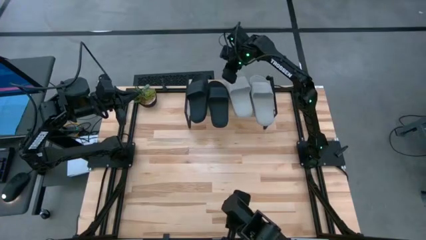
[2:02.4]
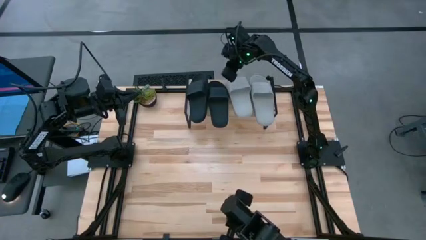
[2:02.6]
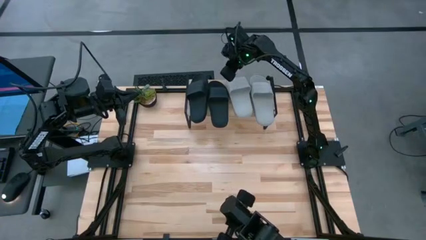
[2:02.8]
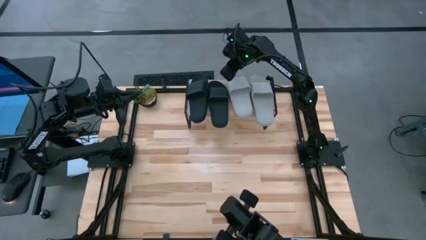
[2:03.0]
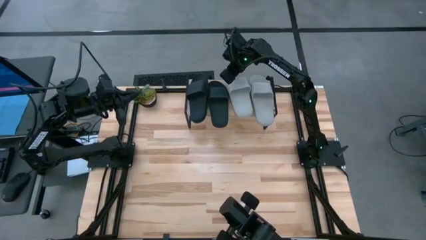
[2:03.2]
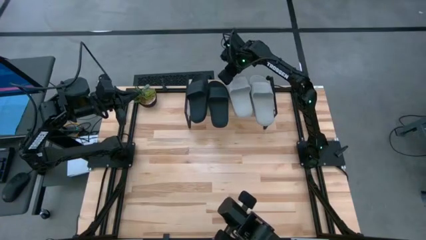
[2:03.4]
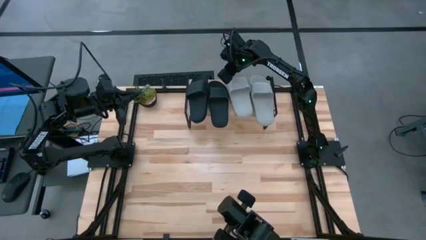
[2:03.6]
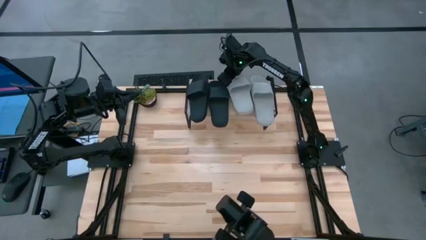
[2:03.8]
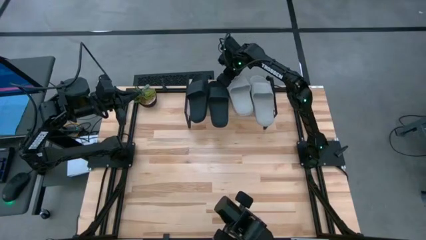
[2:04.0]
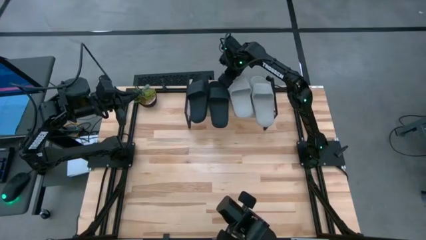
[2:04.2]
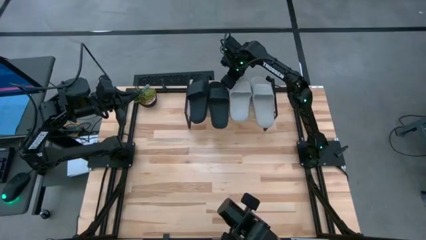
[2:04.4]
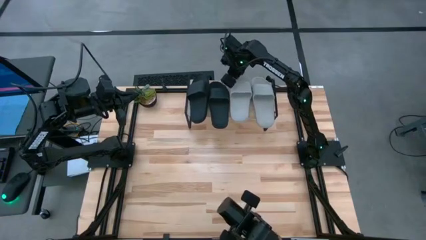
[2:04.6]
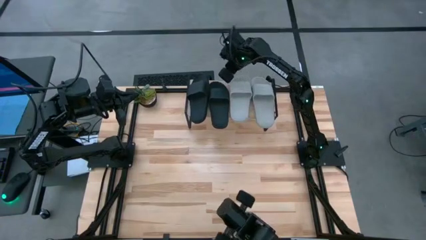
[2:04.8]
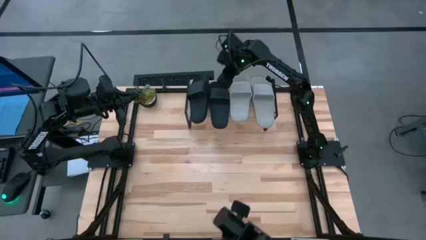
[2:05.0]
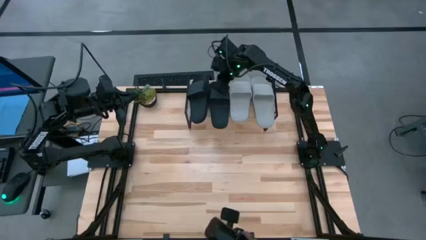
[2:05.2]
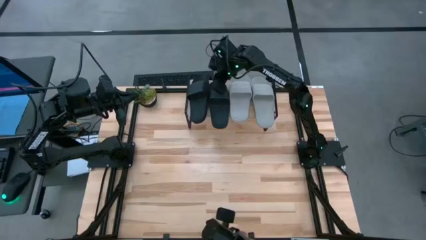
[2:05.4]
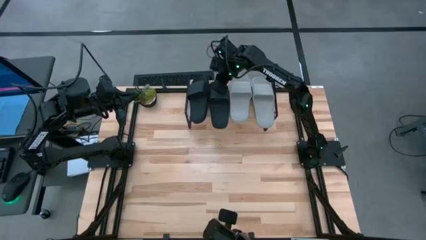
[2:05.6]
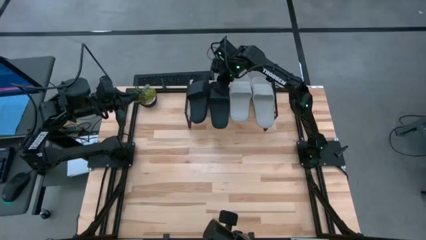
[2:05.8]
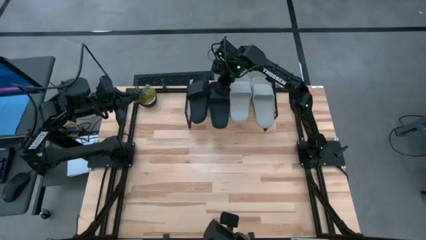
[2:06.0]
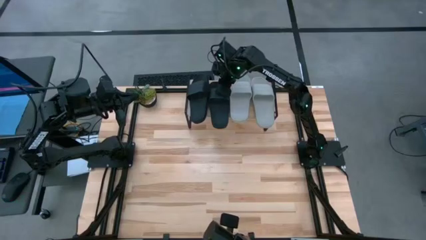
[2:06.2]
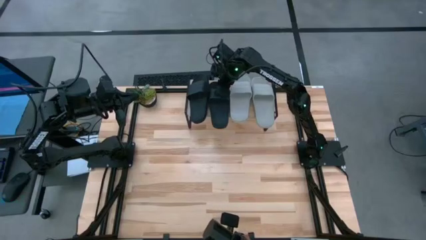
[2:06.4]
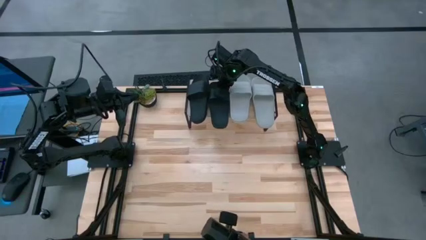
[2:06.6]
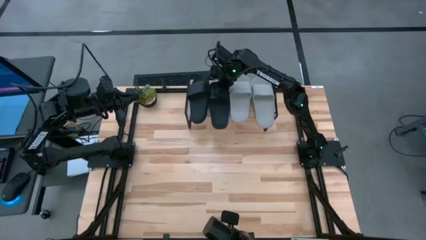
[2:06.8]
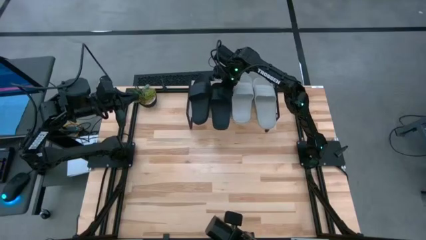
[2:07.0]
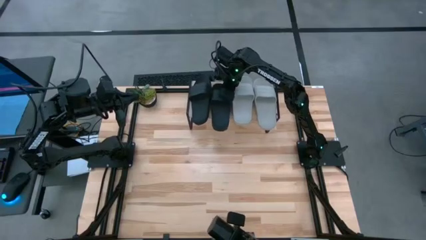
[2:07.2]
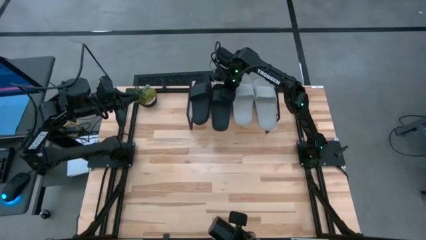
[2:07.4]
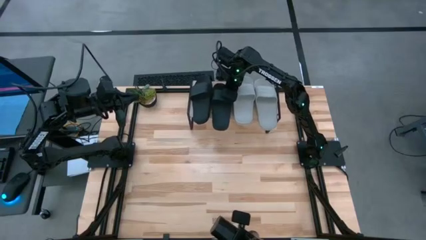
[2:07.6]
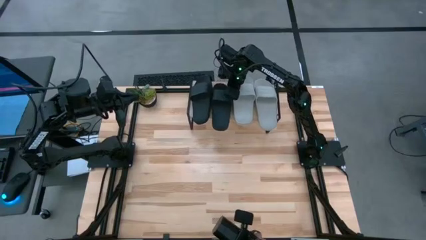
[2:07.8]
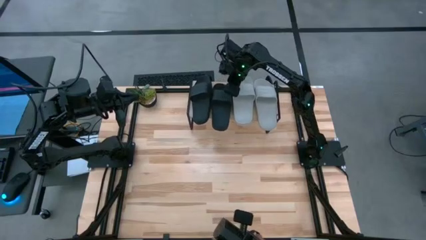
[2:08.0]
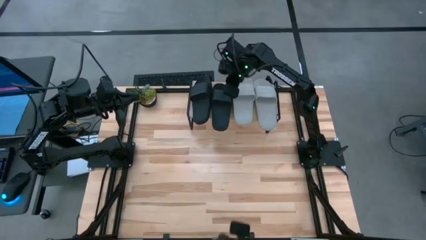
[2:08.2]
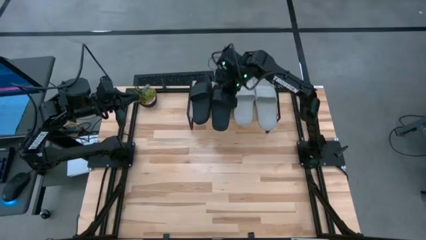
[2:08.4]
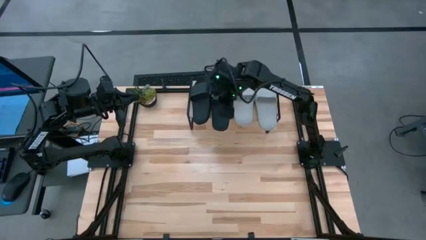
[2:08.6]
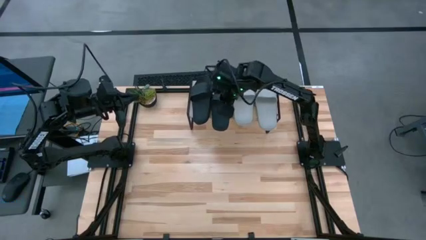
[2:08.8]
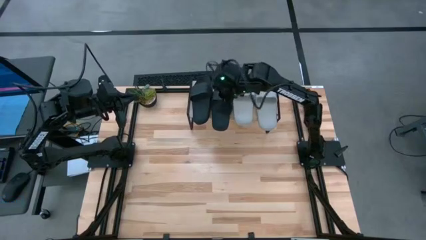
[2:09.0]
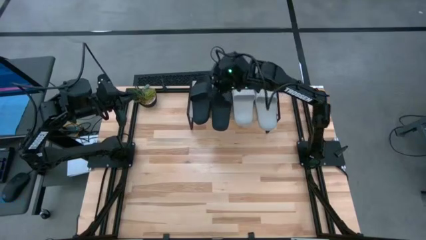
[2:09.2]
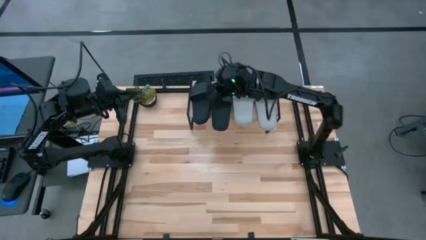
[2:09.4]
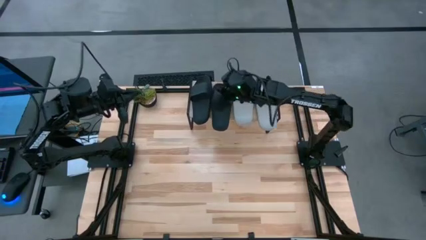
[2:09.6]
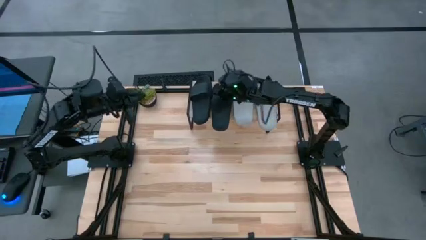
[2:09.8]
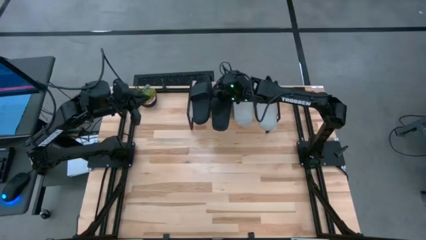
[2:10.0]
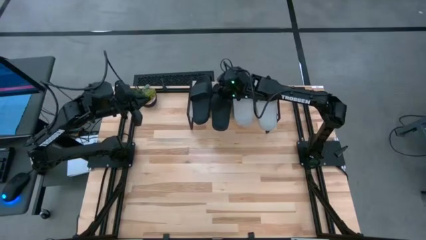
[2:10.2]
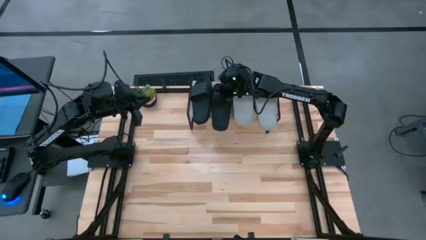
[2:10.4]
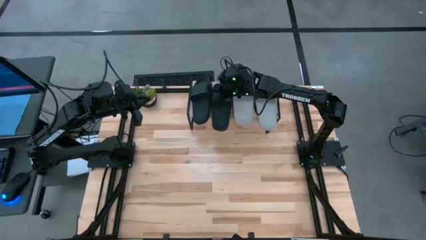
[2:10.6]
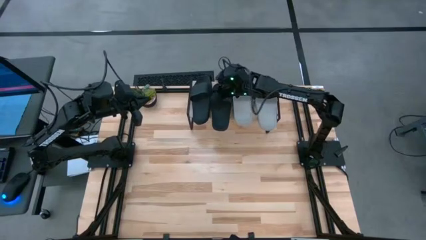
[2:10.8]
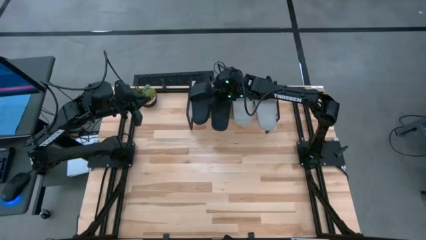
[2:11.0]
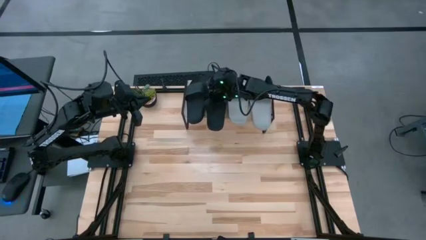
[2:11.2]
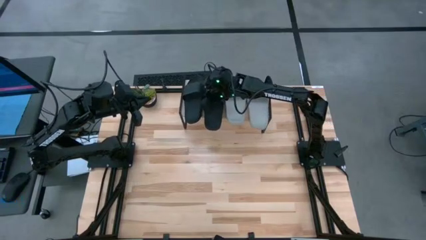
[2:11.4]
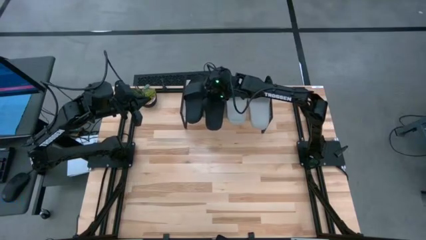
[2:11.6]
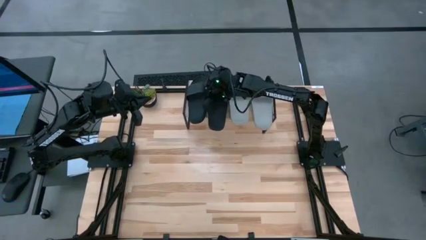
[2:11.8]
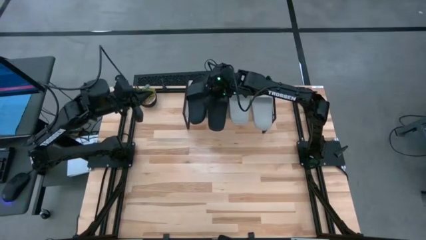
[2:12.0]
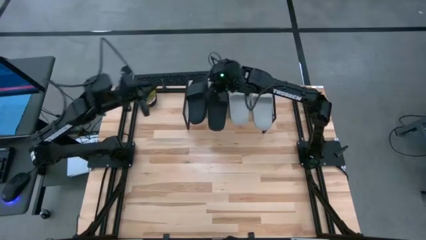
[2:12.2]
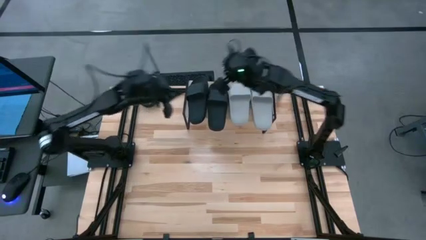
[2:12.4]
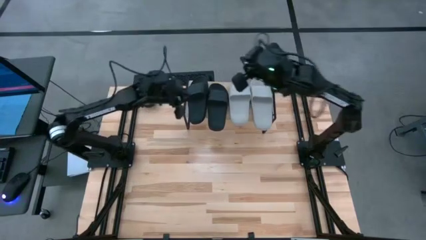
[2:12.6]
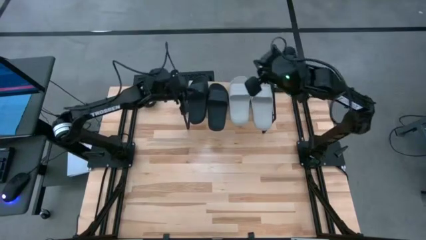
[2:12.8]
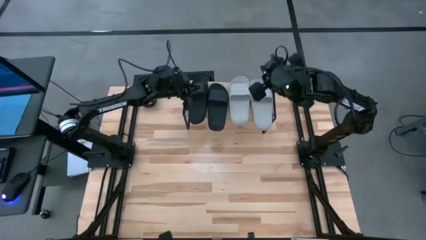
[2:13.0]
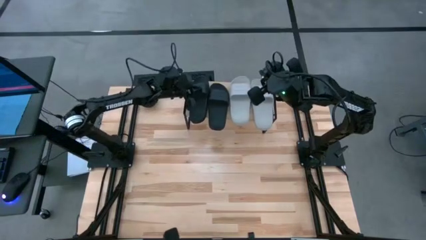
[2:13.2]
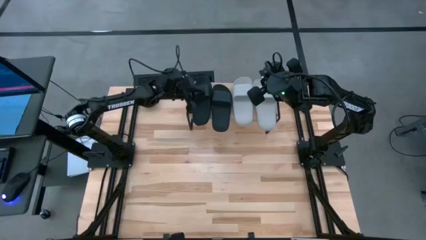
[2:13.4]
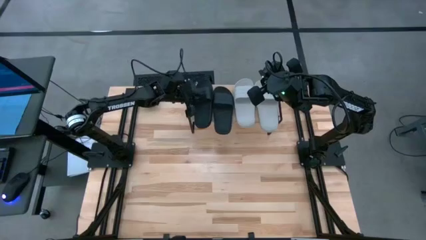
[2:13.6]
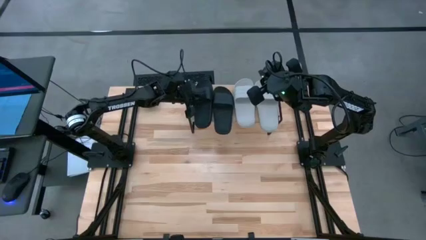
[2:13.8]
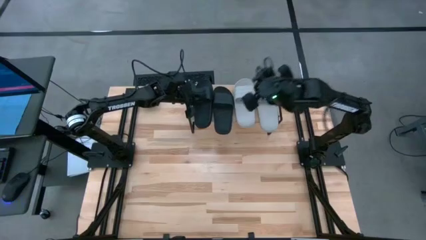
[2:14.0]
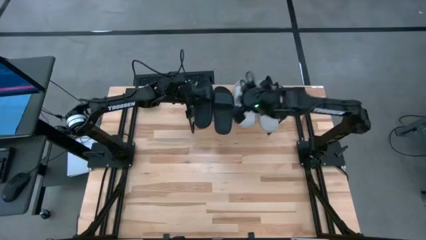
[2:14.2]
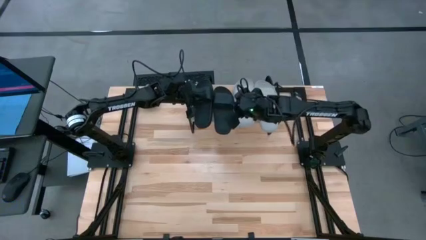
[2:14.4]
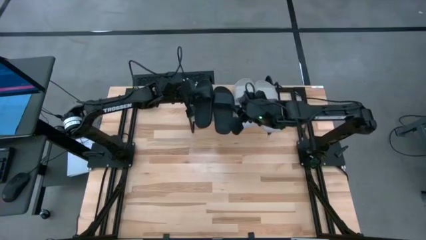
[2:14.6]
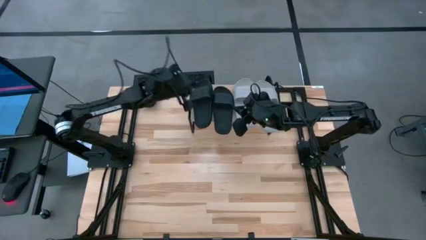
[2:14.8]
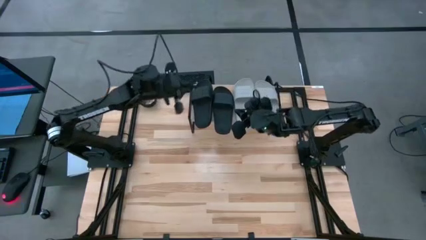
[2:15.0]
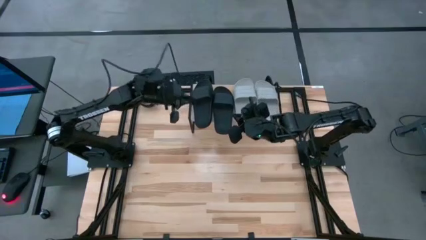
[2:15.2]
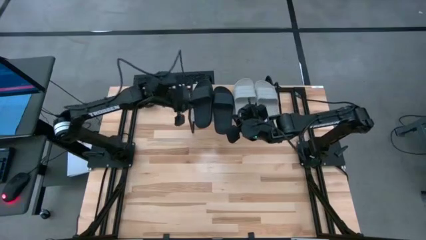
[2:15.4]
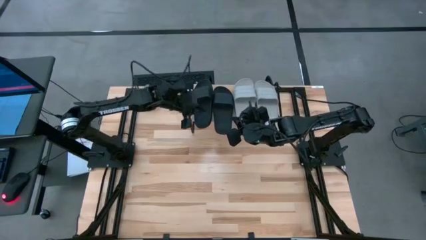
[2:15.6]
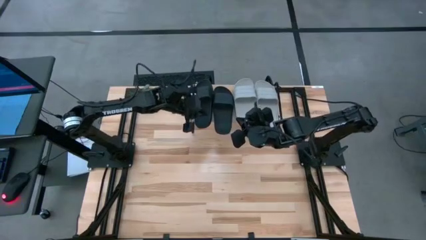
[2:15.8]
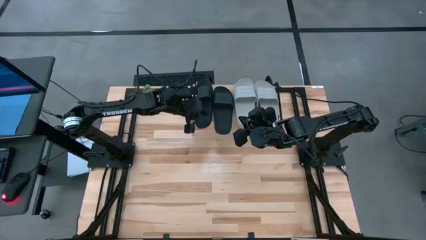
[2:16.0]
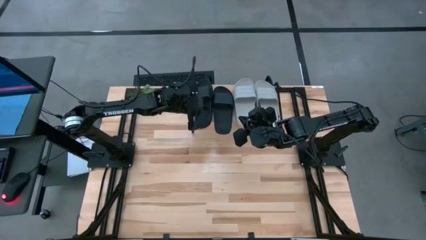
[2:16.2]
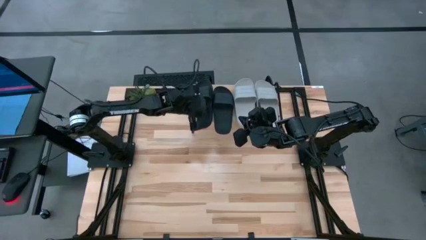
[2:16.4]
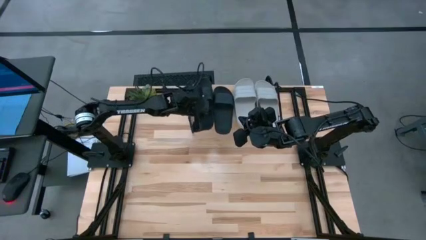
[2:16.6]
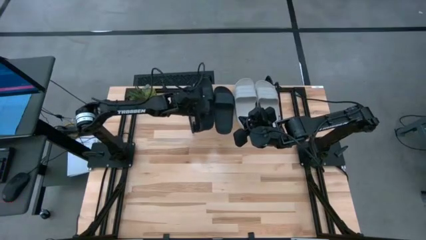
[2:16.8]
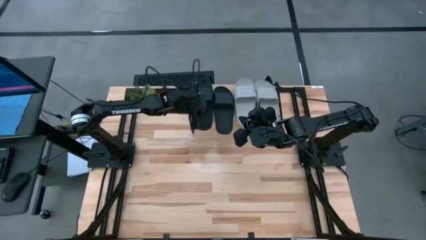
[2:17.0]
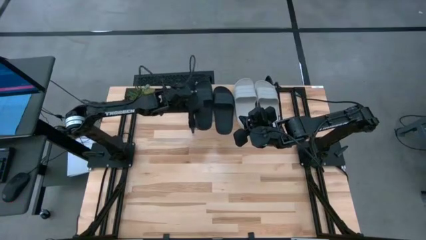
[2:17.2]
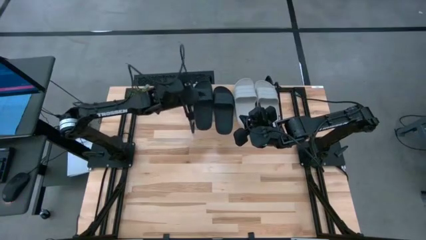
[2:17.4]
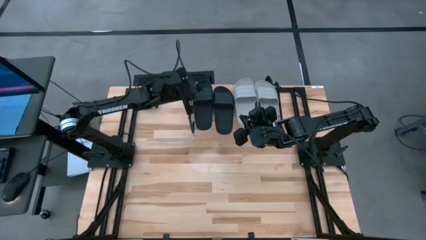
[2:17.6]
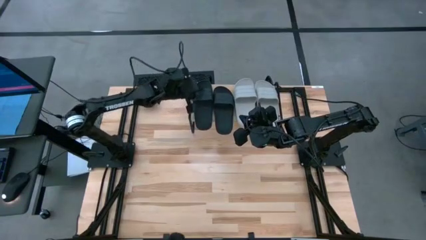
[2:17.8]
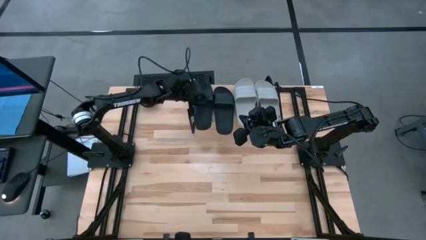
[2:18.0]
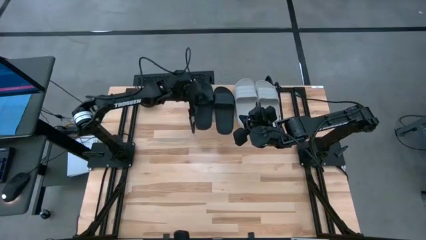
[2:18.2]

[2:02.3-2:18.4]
Task: Pick and place slides into the shelf
Adjust the slides on the shelf
